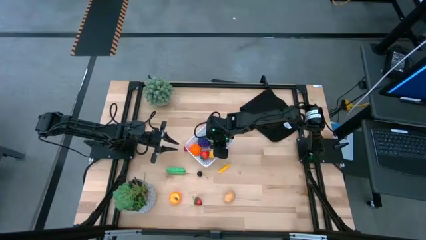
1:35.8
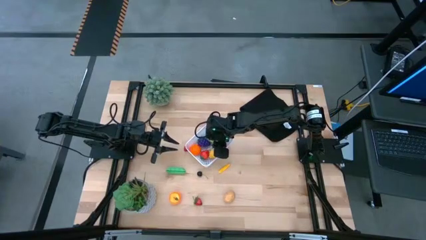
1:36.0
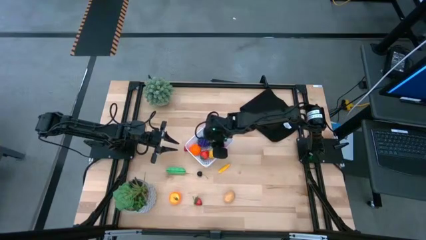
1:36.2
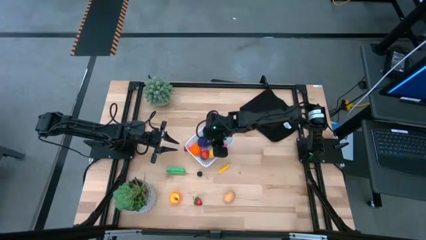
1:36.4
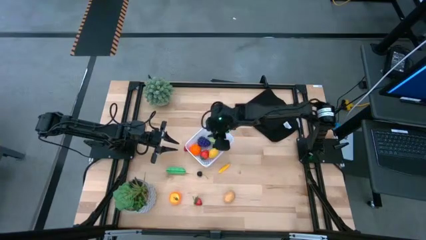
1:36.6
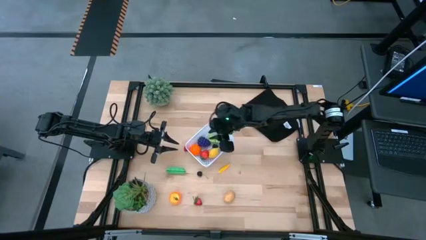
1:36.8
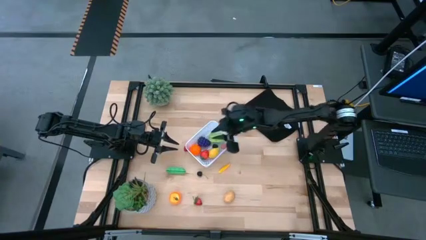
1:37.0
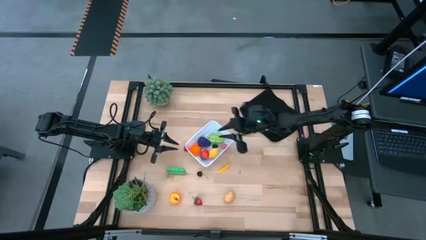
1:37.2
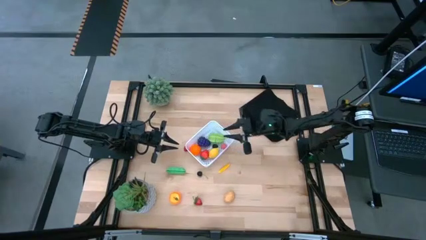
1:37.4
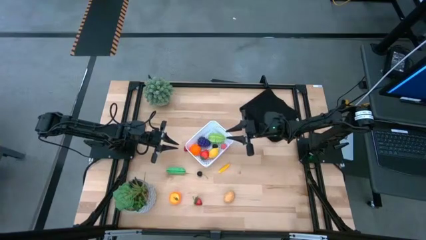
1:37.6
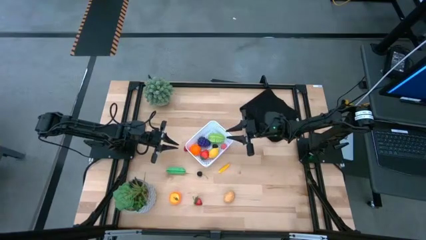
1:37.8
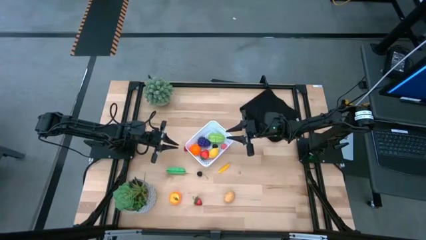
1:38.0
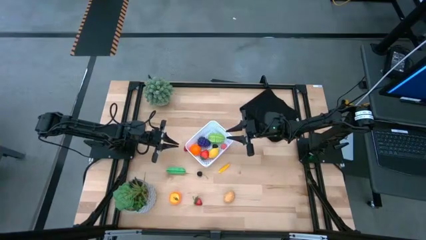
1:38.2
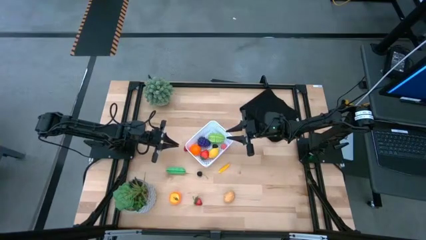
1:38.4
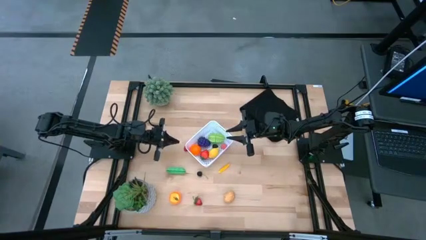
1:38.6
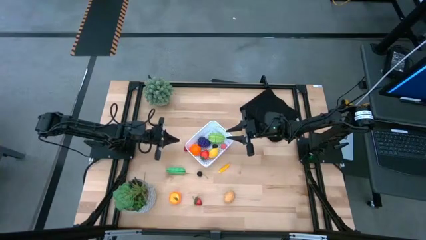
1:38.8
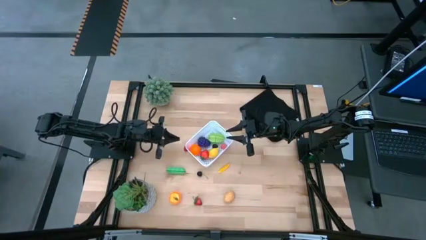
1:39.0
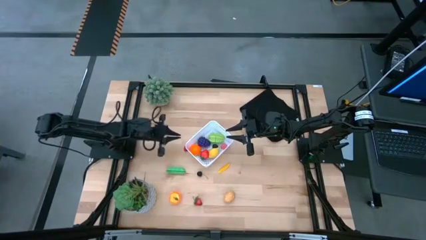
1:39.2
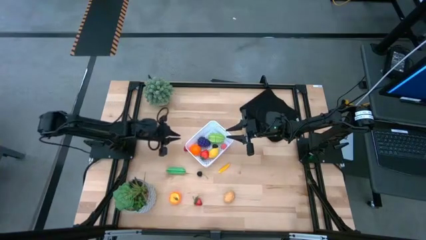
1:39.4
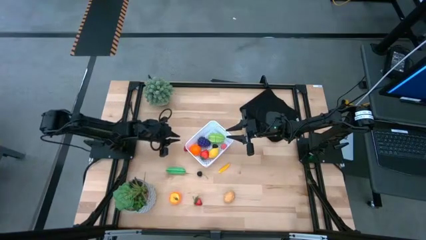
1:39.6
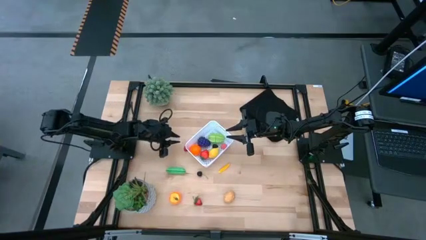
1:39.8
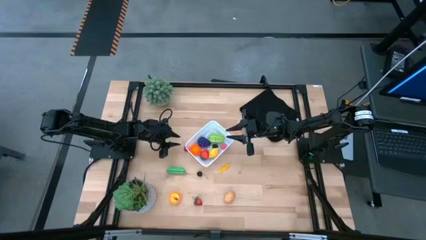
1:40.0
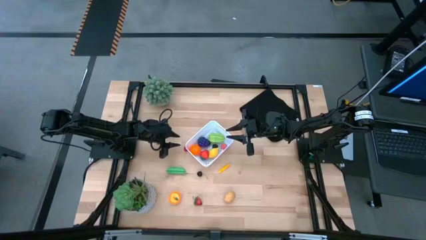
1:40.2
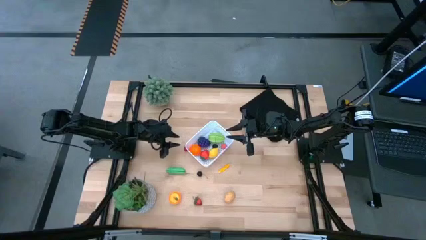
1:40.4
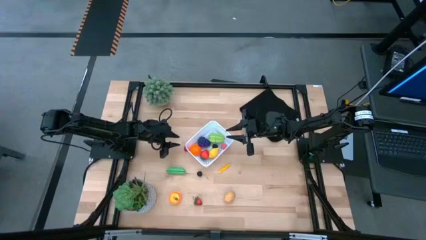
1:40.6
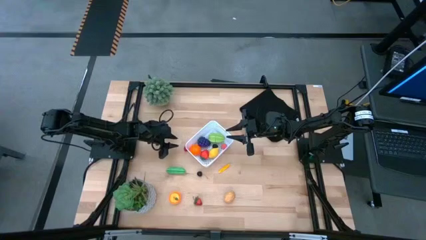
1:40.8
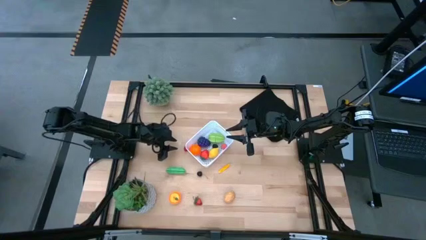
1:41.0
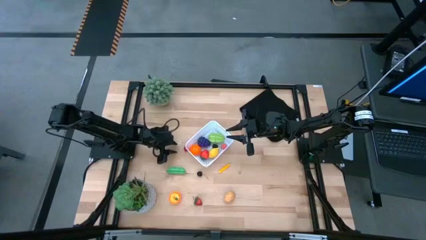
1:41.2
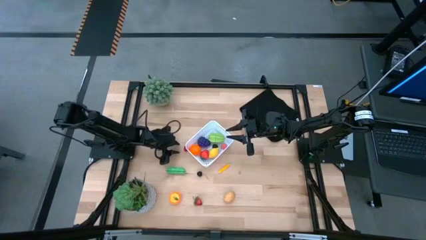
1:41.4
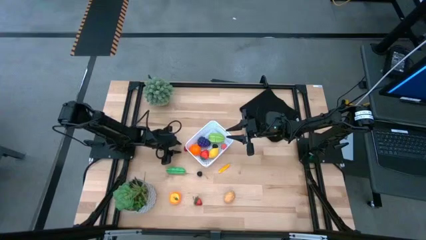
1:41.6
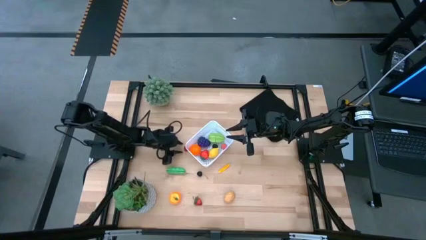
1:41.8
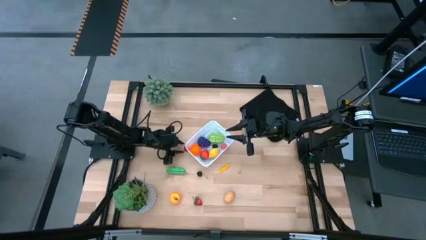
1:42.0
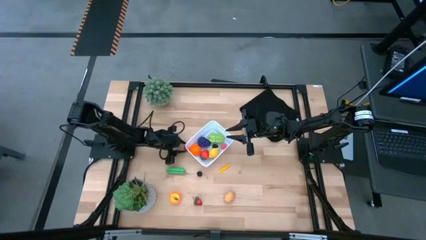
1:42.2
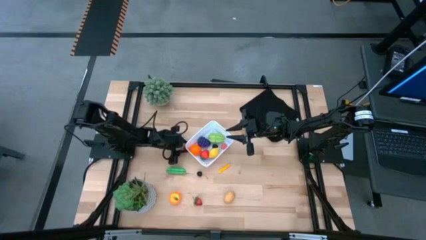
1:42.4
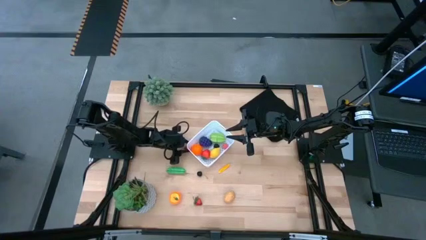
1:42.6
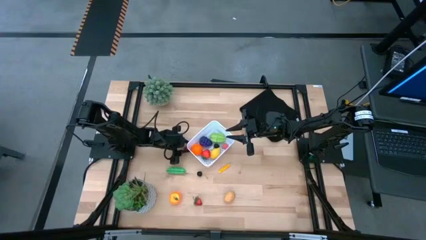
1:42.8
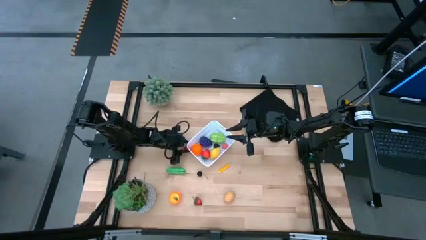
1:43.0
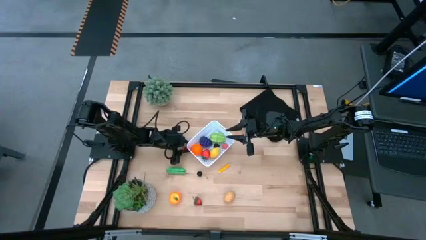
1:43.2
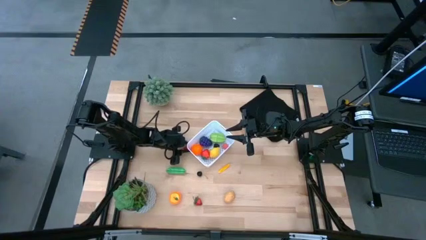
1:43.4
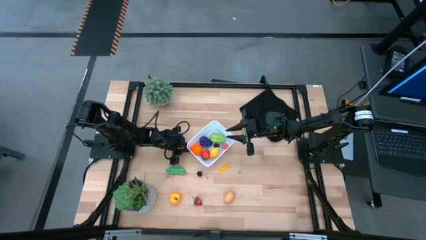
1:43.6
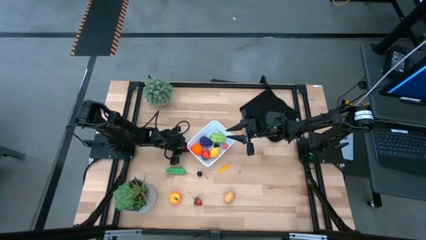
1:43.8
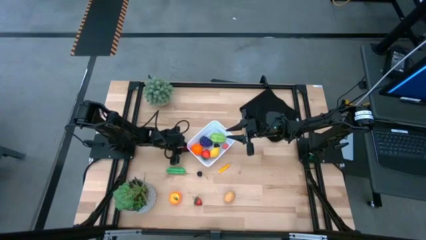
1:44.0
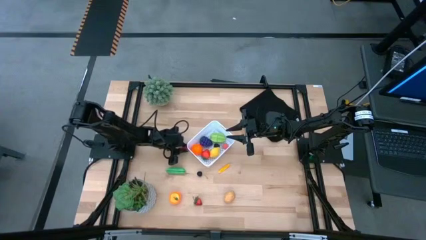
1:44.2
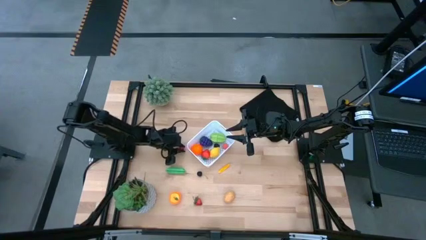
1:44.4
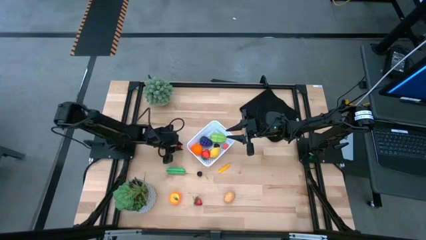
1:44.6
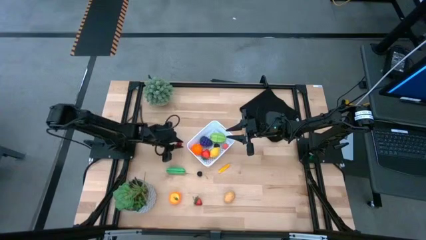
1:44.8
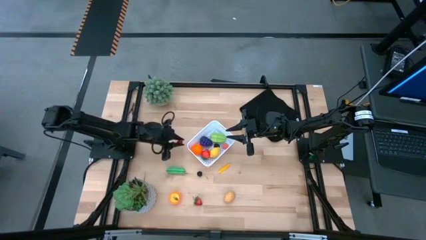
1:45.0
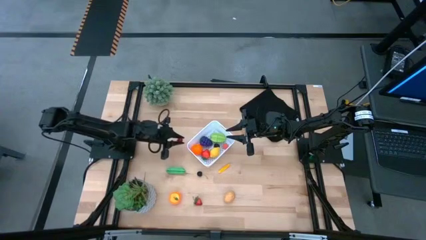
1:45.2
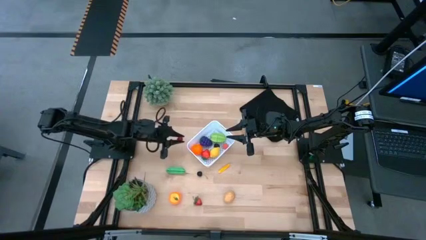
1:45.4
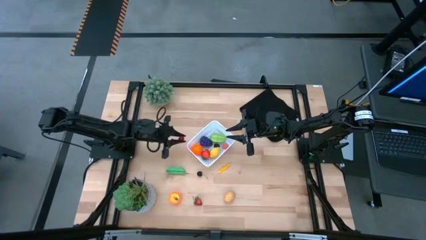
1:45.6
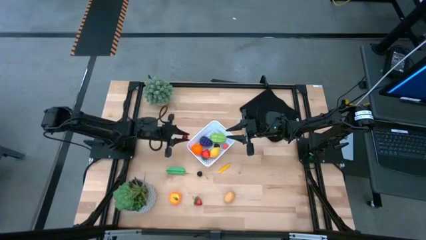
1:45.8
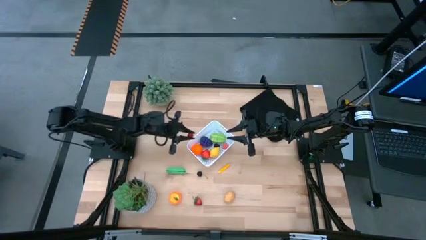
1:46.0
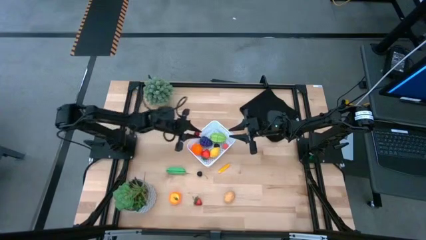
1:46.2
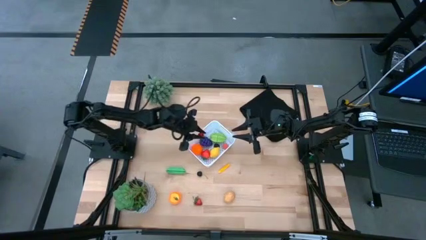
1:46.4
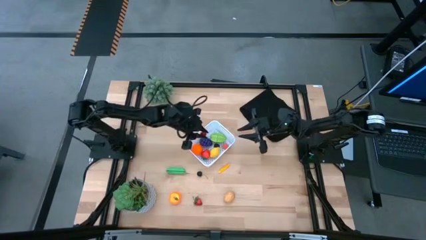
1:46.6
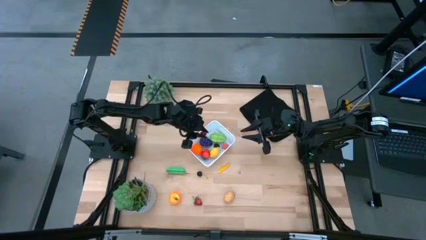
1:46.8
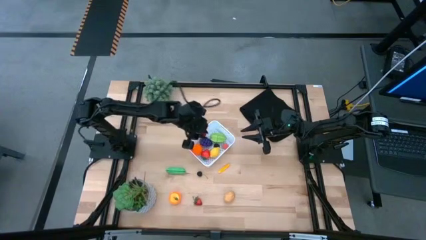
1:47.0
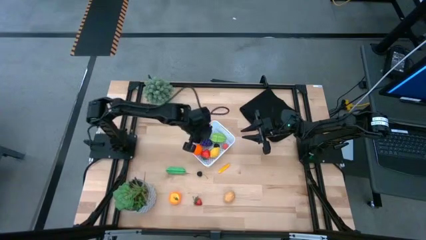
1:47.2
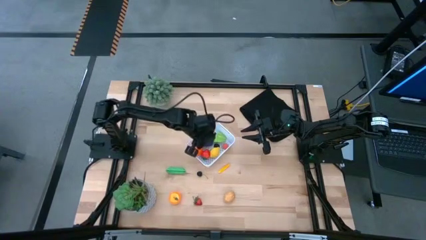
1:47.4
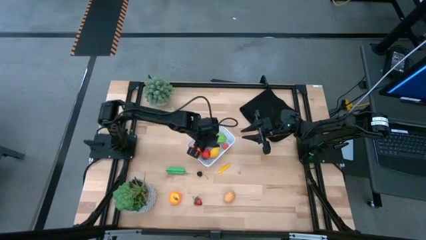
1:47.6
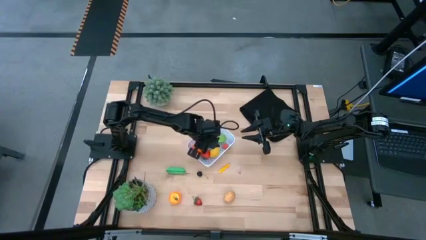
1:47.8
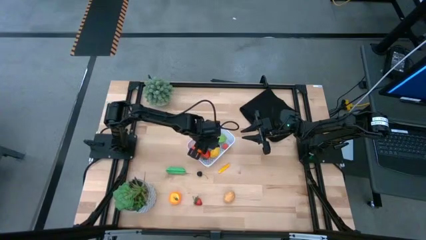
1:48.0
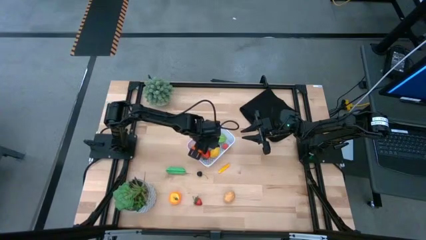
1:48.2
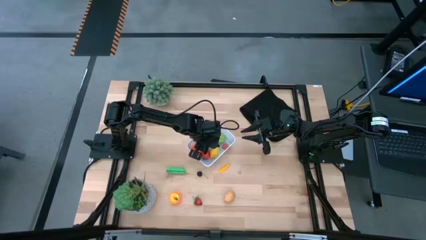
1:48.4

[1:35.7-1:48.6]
Task: Pick and placing Produce into tupperware
Put the raspberry into the white bin

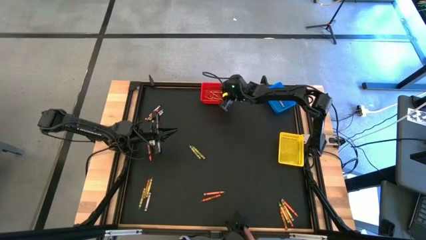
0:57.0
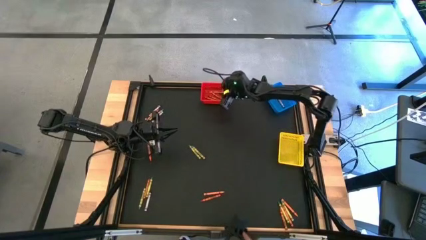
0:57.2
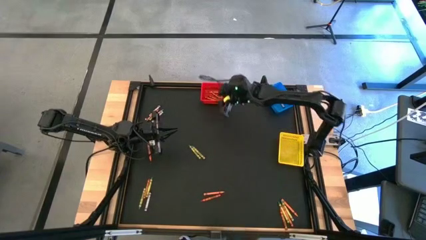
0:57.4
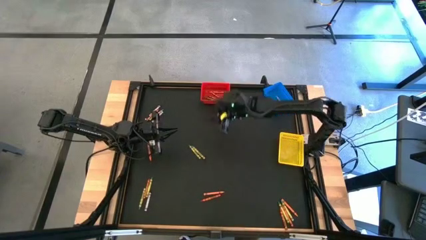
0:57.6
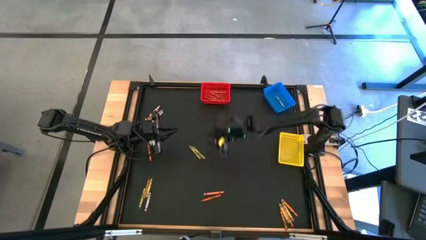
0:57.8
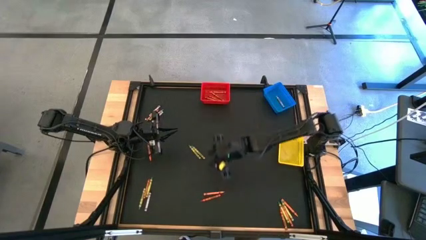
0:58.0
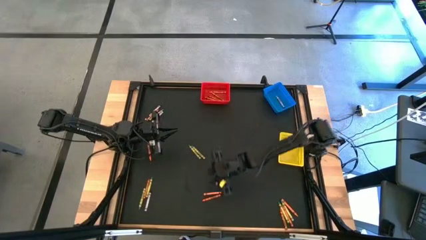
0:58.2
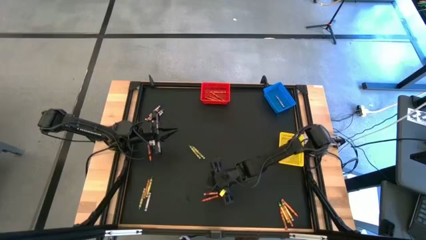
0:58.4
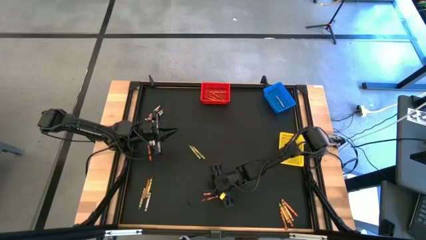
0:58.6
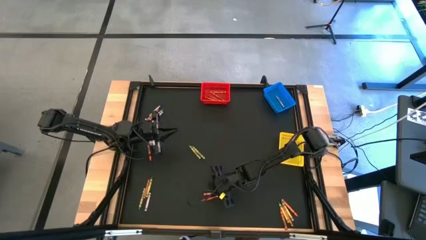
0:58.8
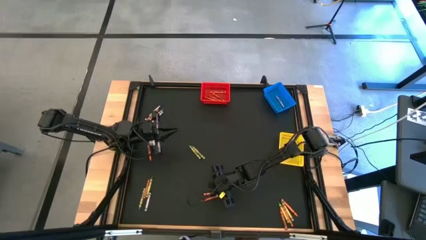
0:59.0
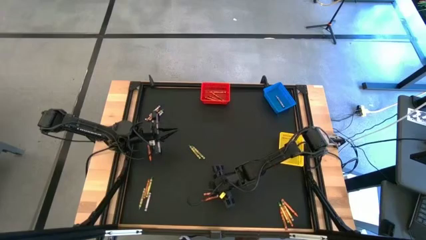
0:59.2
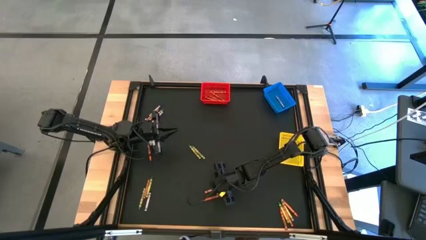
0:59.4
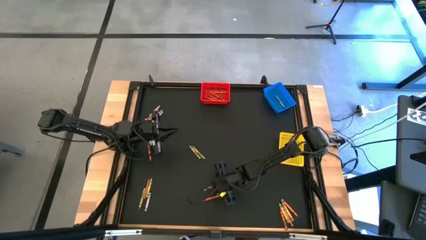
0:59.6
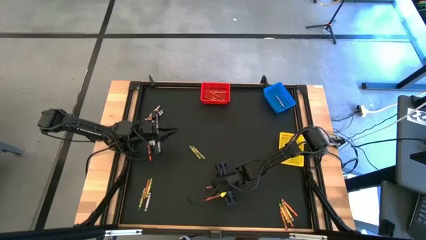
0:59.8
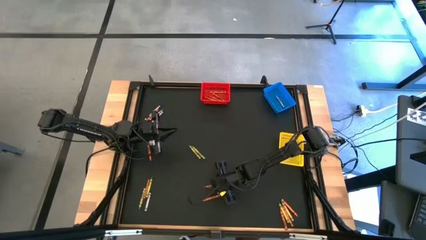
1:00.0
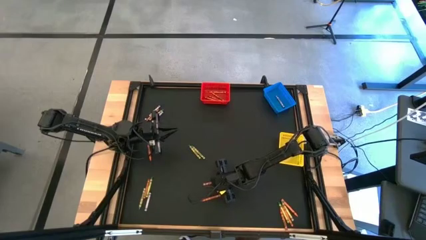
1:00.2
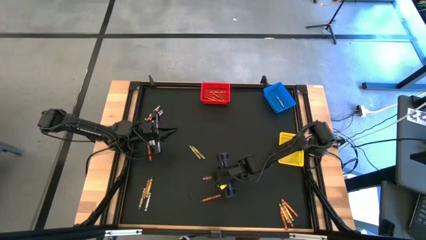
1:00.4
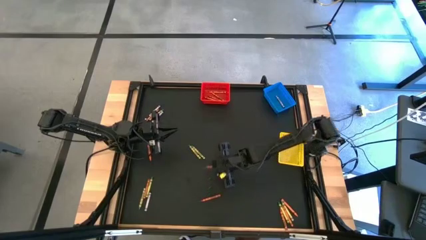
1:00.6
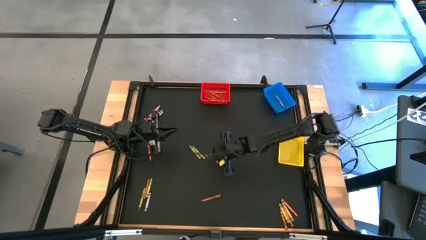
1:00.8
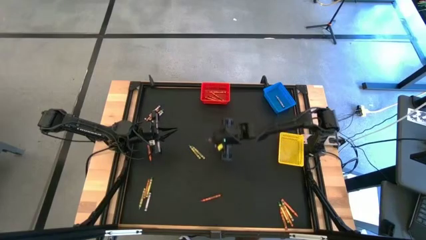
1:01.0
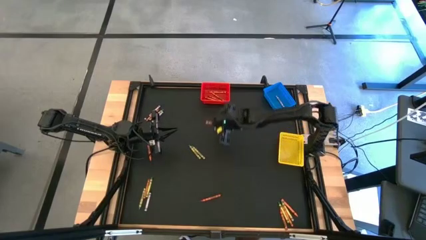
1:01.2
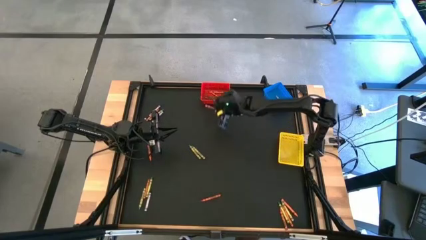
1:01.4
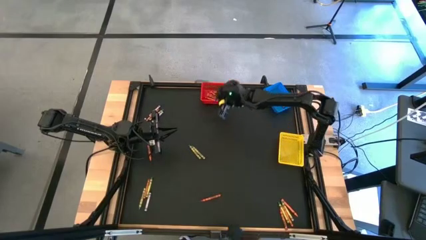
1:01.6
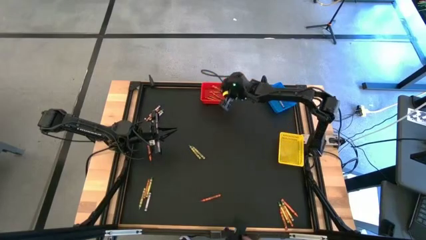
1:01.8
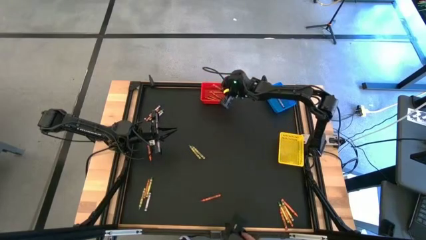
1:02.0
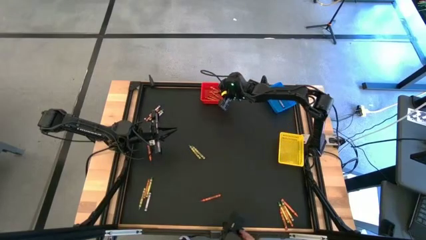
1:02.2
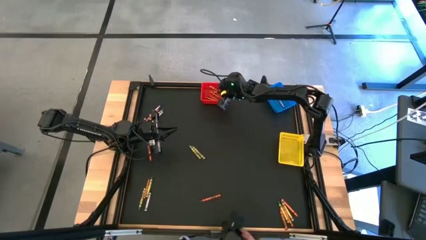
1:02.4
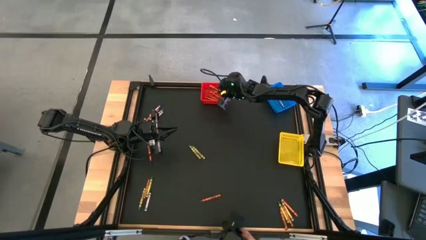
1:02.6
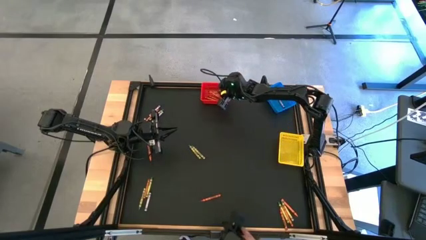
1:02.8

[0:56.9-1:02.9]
Task: Sort crayons
Put the orange crayon into the red bin
